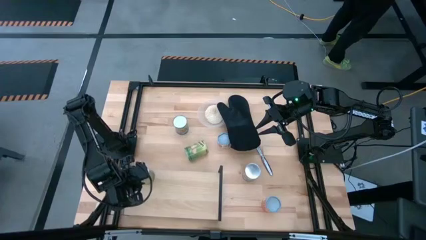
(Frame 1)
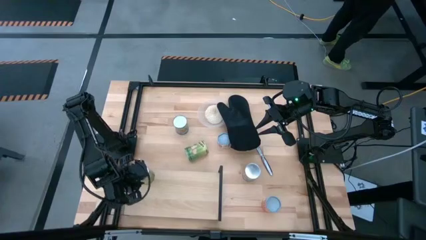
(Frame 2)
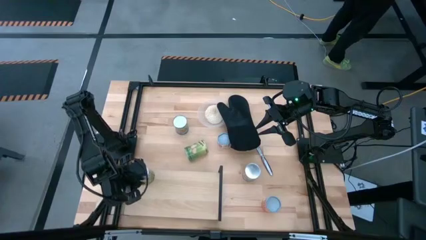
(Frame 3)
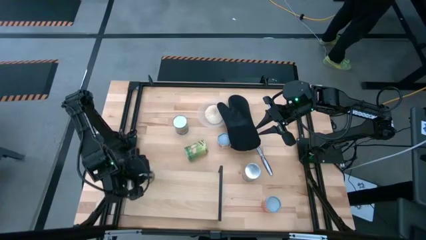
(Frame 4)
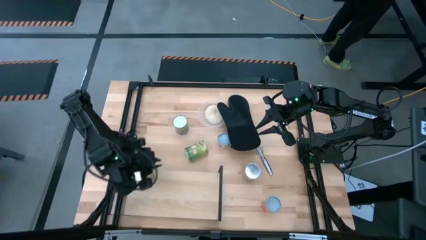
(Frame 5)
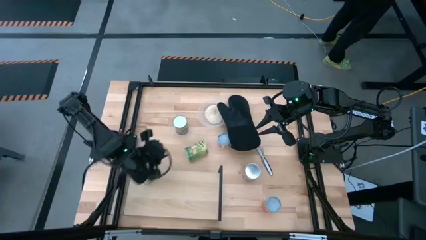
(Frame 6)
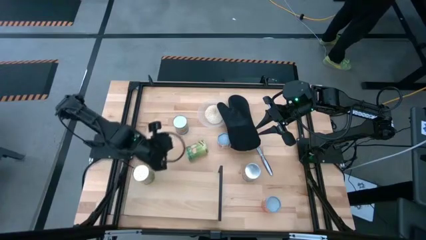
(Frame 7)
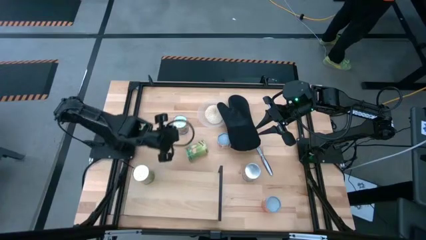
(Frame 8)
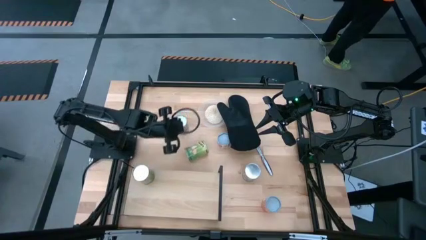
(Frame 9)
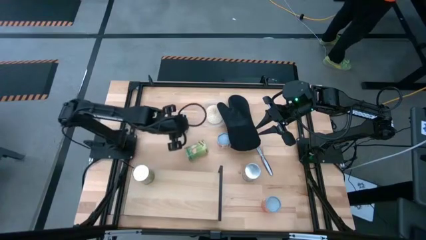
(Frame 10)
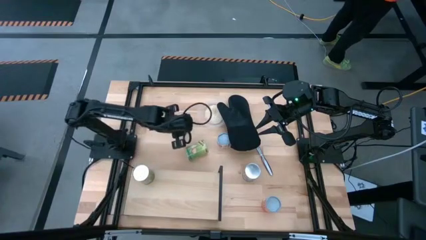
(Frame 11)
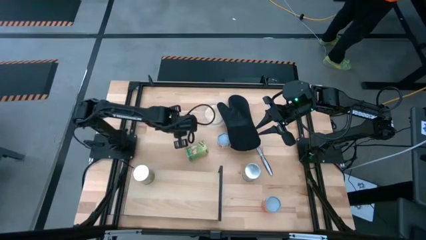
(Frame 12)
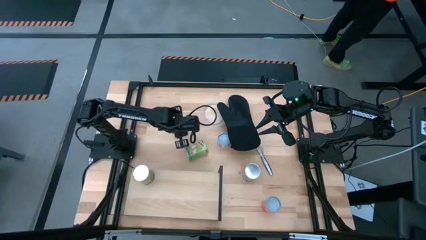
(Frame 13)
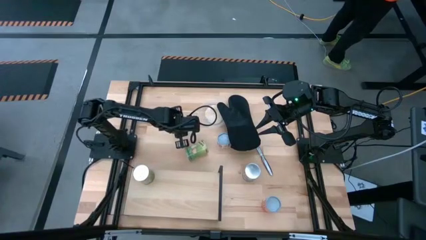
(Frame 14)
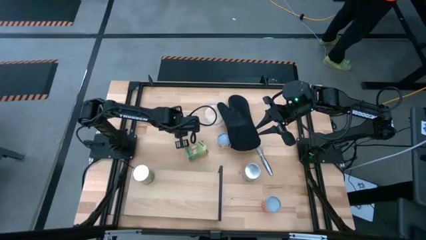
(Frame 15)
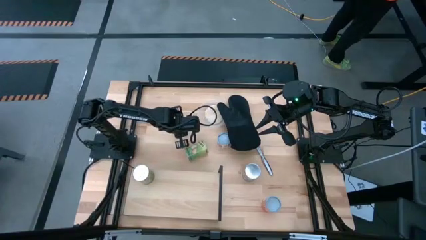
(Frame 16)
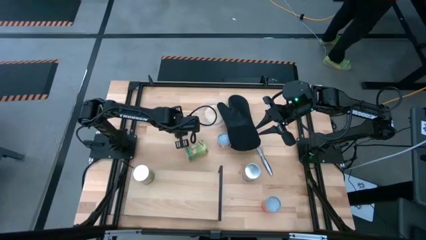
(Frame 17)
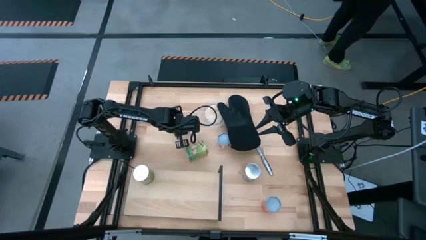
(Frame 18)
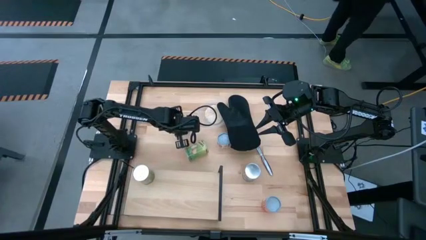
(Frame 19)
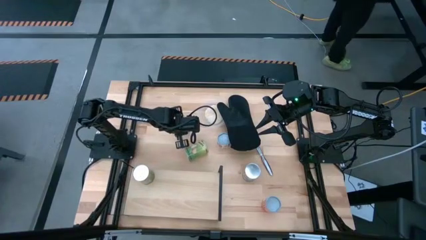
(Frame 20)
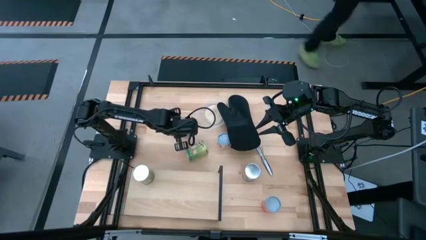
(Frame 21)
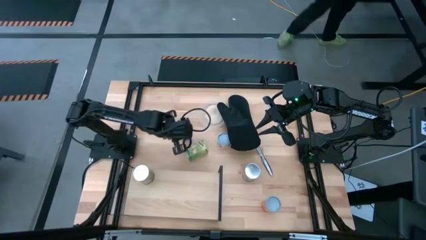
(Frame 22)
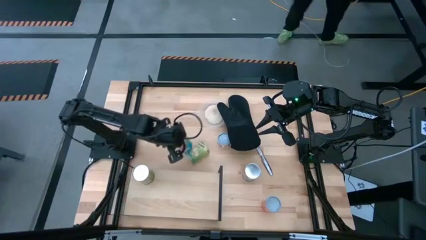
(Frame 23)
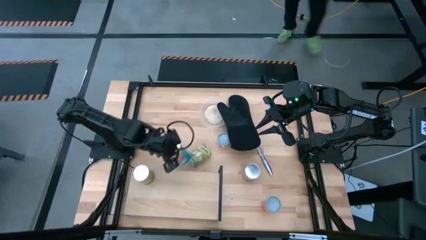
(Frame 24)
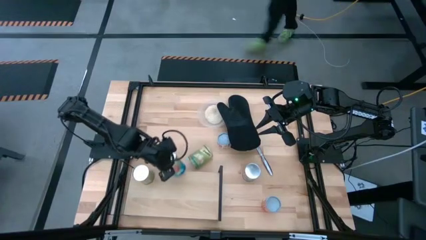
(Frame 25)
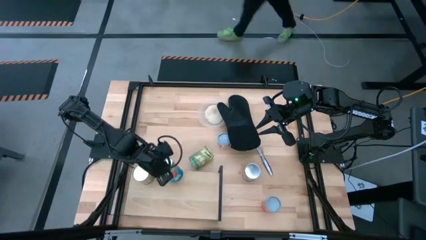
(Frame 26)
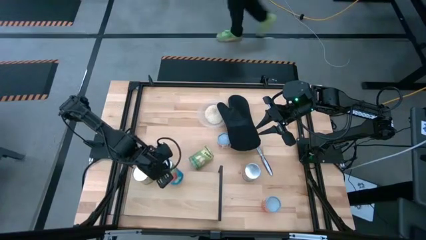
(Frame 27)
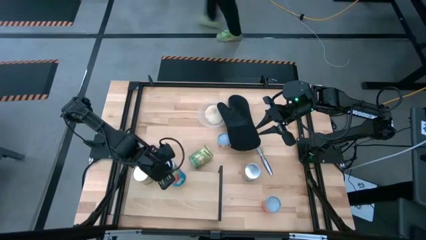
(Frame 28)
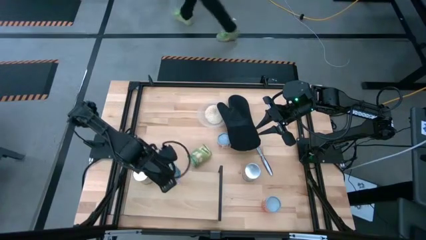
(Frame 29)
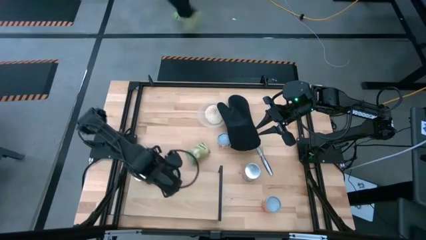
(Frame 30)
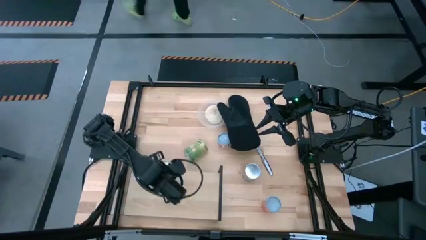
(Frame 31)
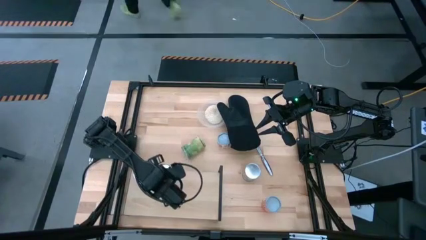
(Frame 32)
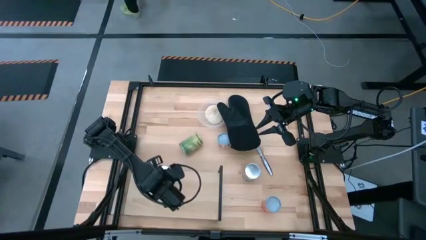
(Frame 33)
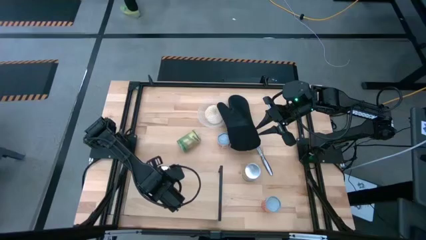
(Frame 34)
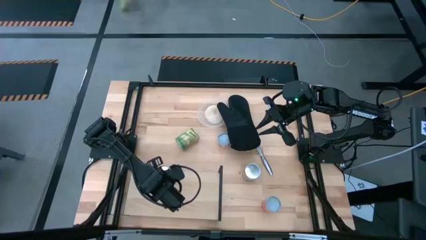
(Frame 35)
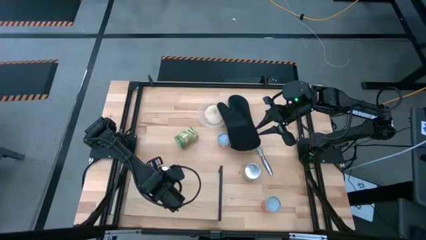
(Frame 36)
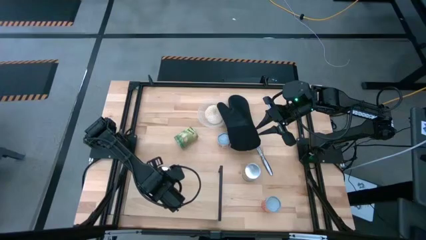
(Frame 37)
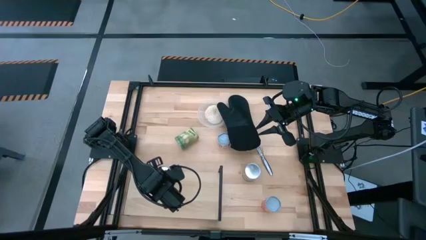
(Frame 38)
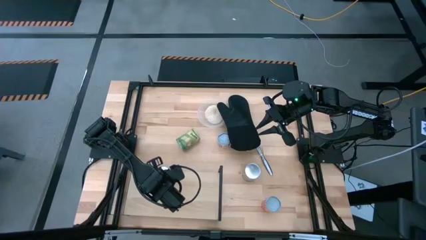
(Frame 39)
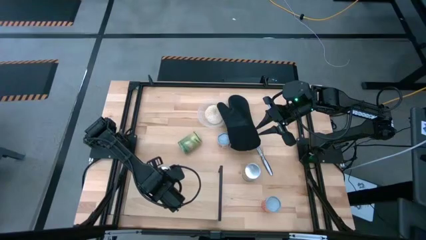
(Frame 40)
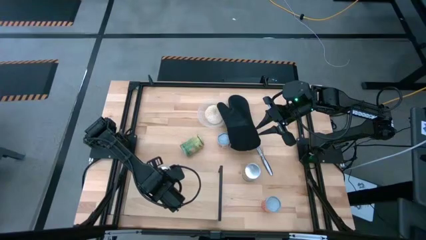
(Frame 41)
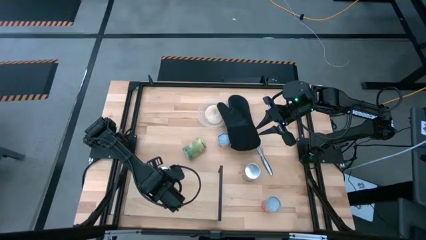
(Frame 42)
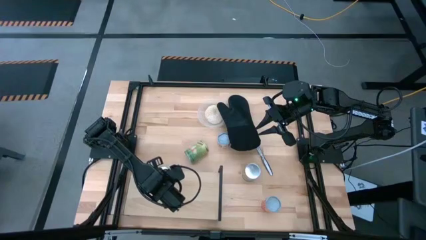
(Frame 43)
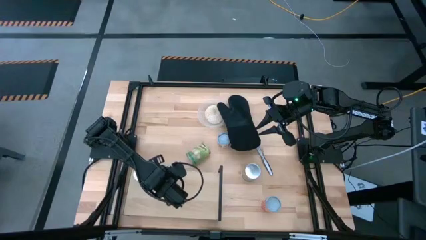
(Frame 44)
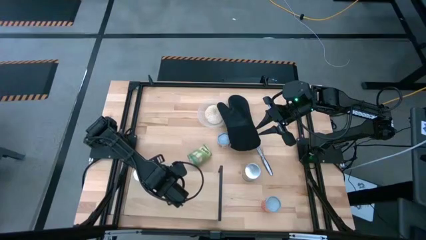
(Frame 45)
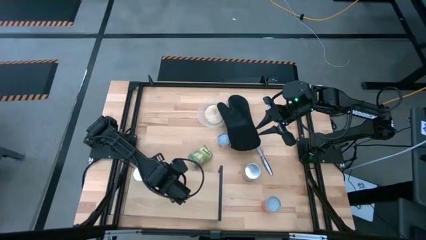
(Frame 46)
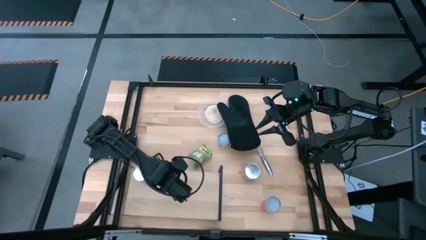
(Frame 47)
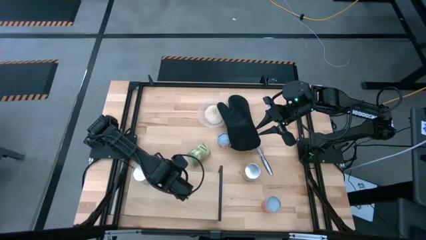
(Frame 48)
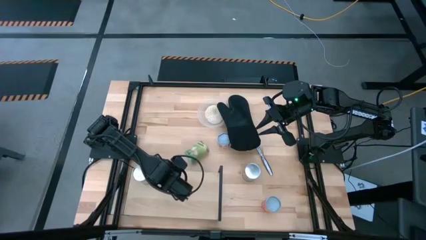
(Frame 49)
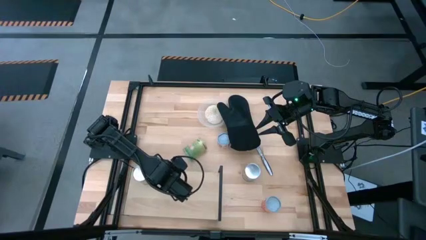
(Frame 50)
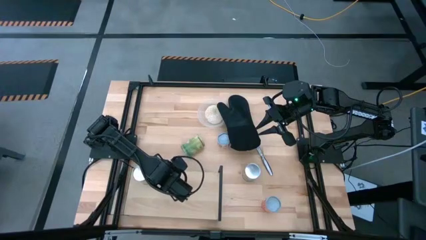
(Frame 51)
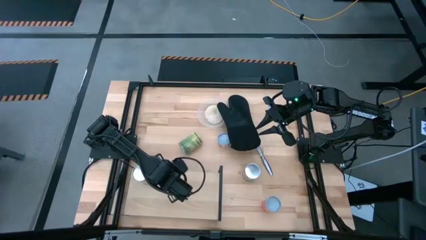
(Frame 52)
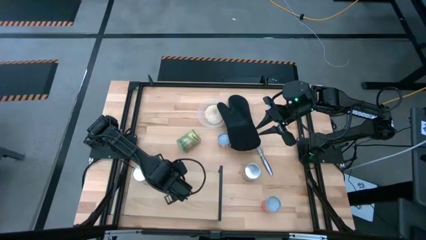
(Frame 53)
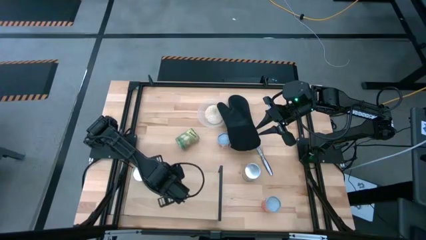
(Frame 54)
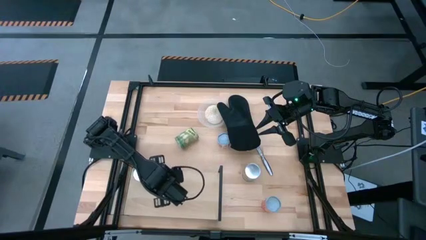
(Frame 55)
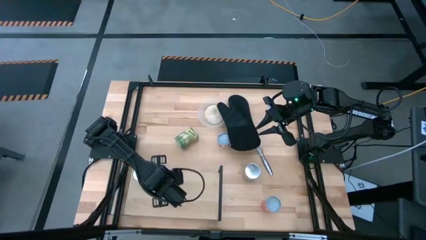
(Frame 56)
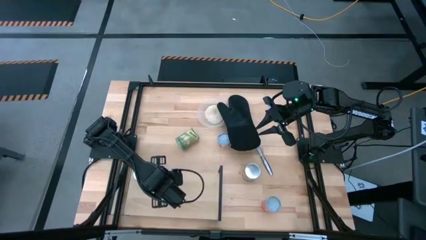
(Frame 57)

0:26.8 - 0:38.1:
Task: Pick and place cans onto a shelf
Put the blue canned tomato on the shelf
